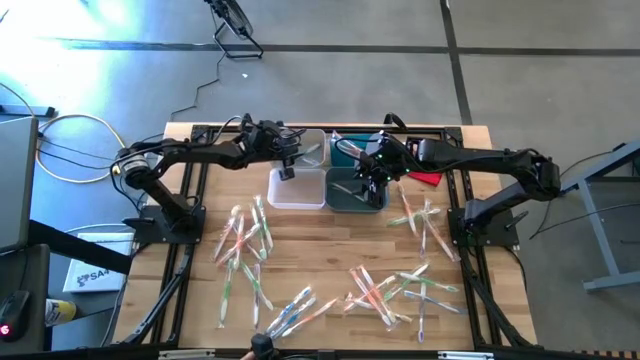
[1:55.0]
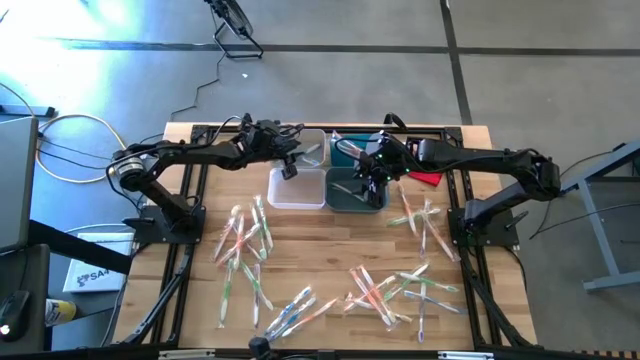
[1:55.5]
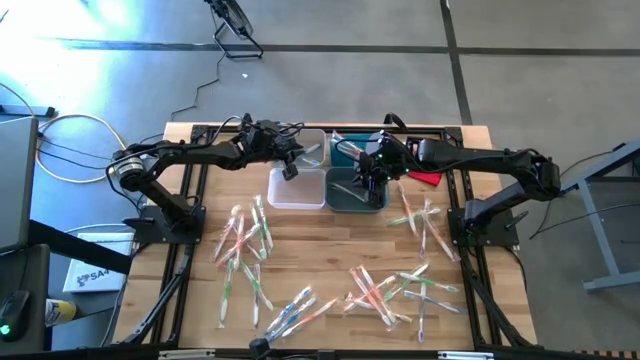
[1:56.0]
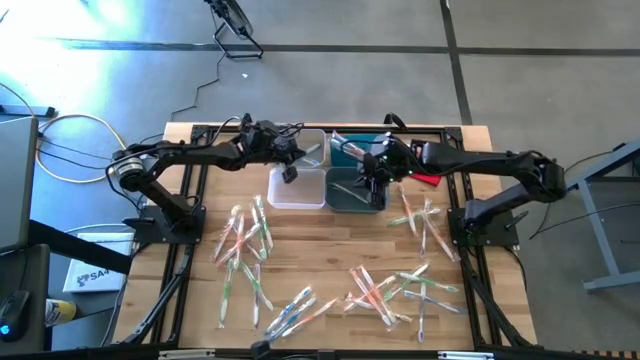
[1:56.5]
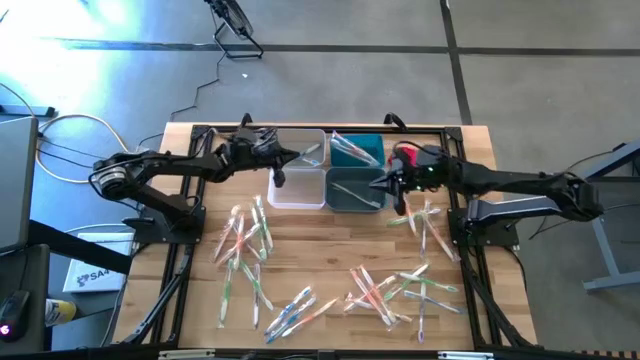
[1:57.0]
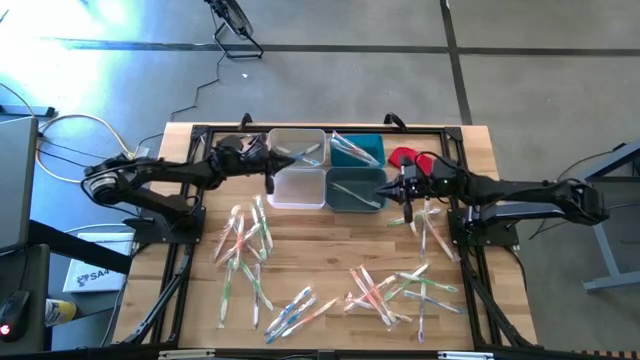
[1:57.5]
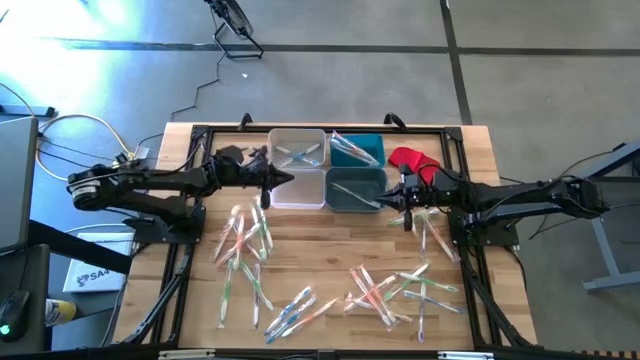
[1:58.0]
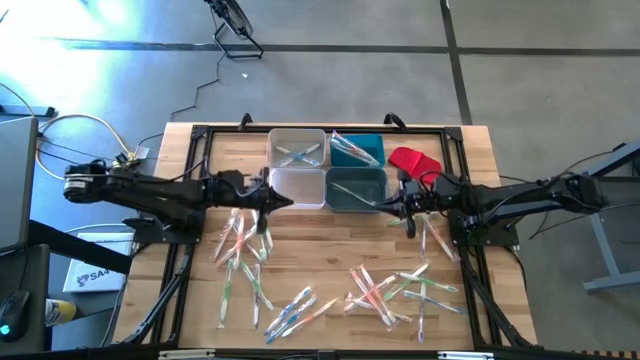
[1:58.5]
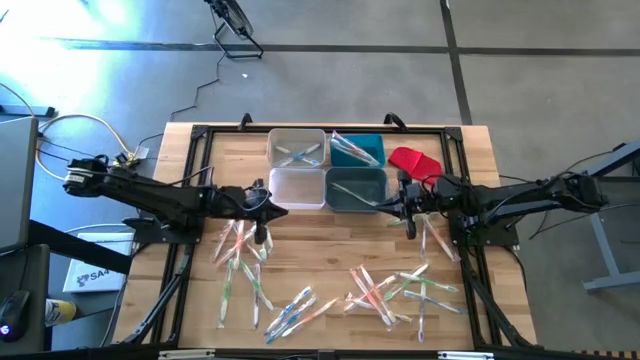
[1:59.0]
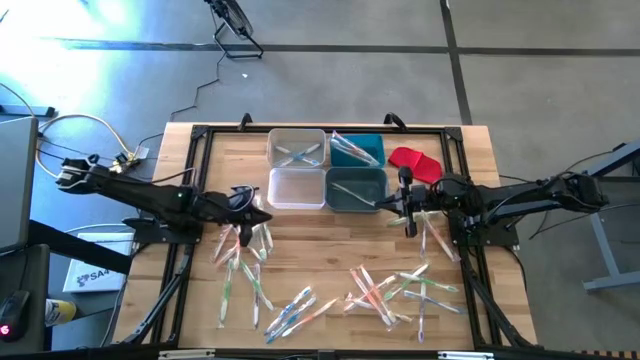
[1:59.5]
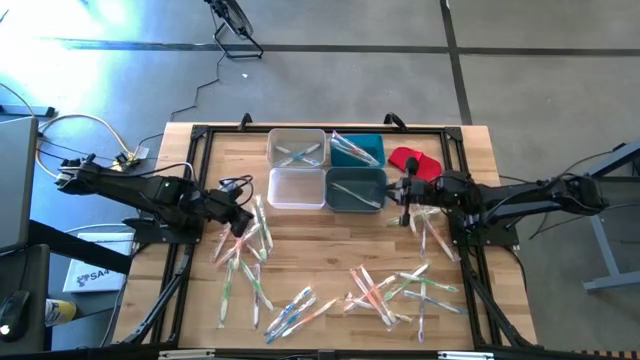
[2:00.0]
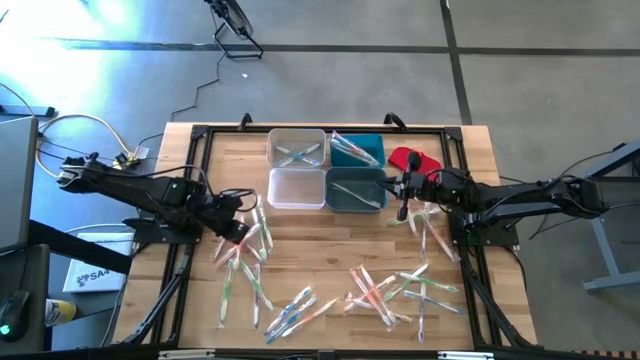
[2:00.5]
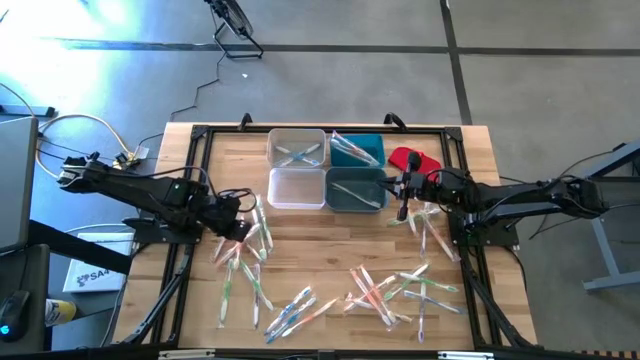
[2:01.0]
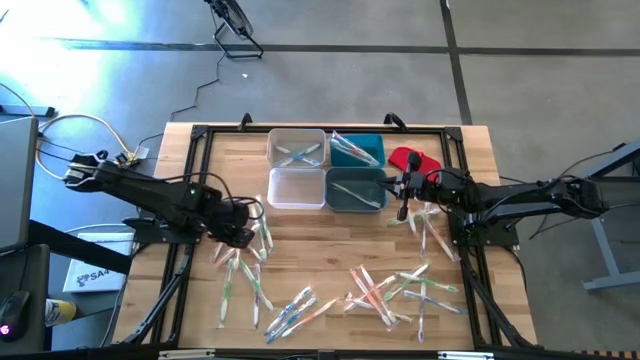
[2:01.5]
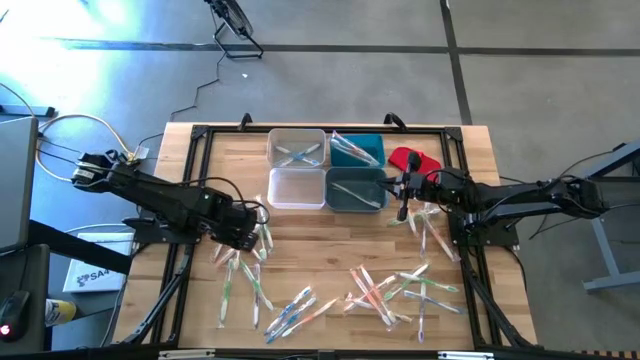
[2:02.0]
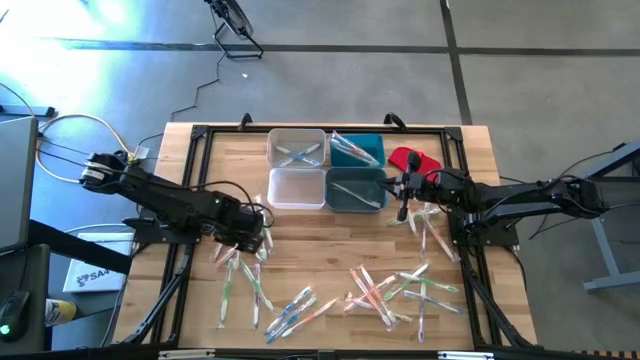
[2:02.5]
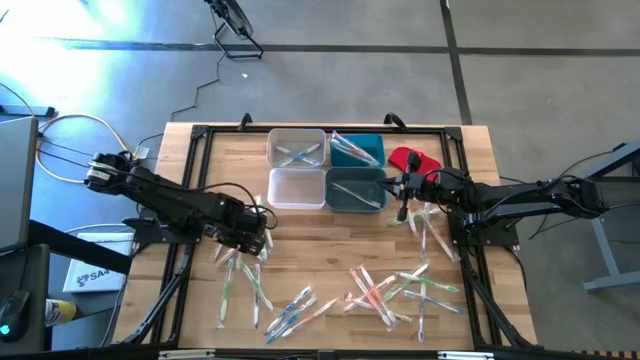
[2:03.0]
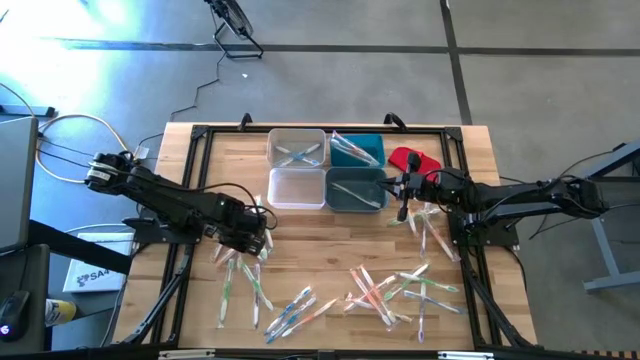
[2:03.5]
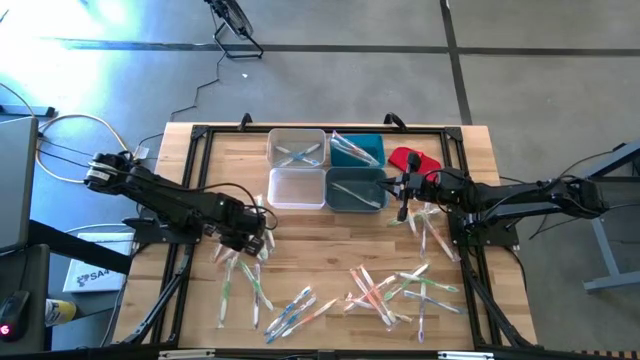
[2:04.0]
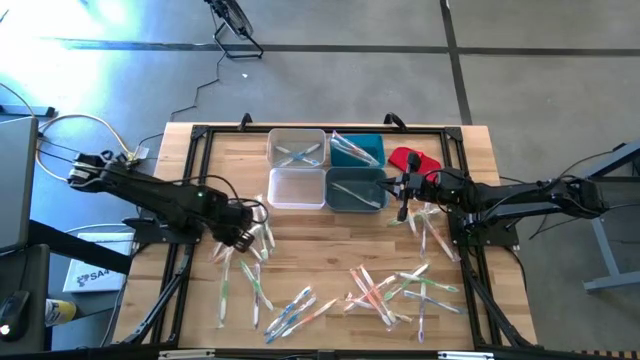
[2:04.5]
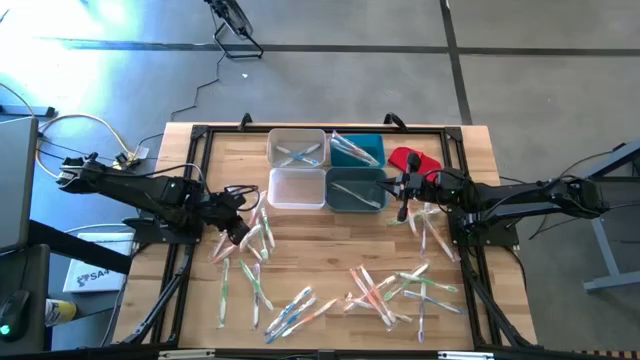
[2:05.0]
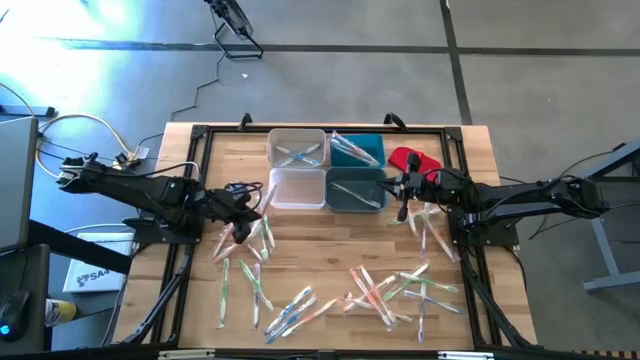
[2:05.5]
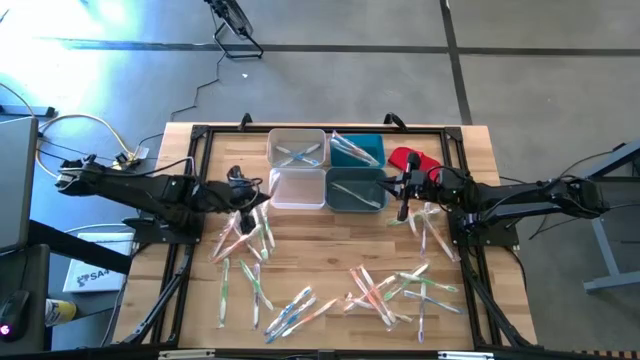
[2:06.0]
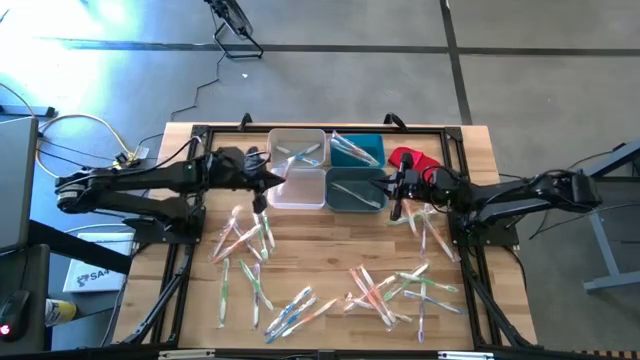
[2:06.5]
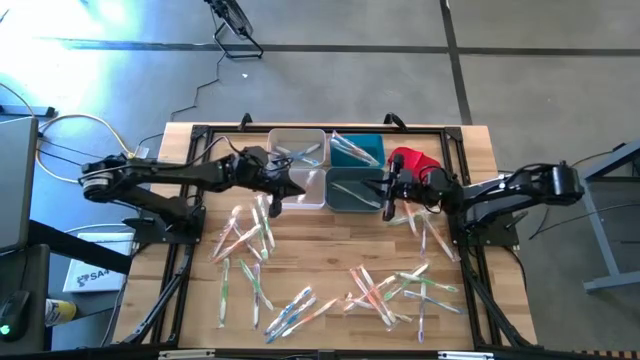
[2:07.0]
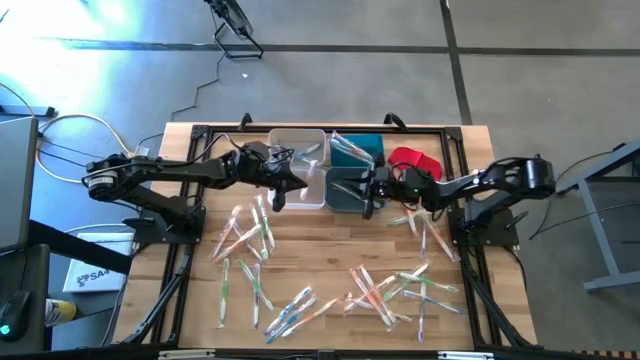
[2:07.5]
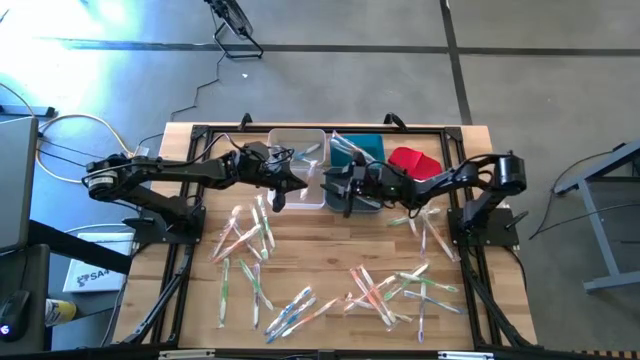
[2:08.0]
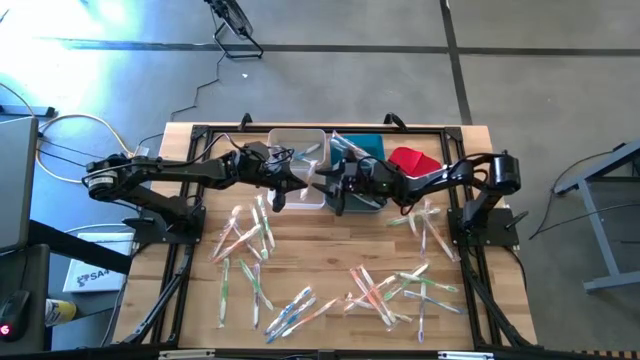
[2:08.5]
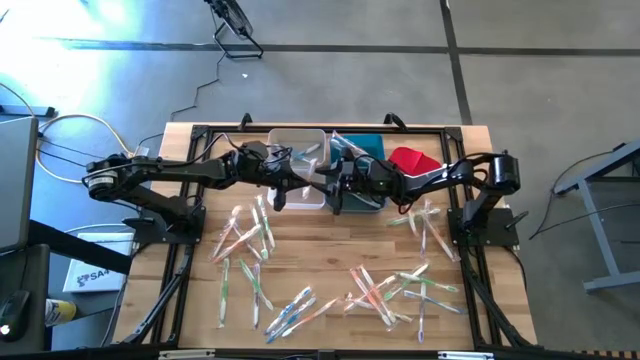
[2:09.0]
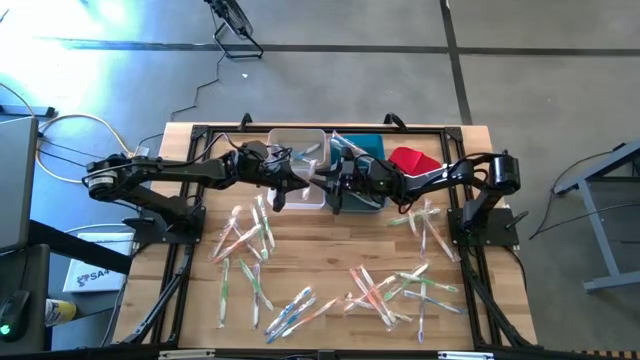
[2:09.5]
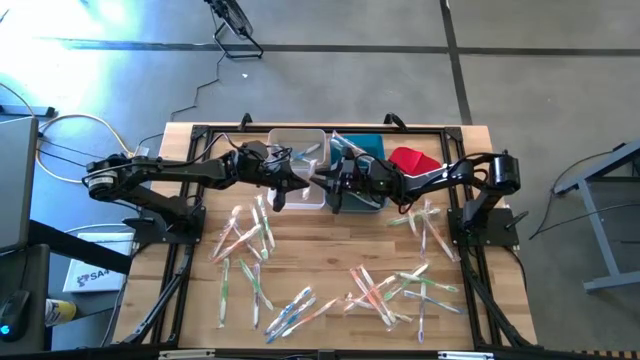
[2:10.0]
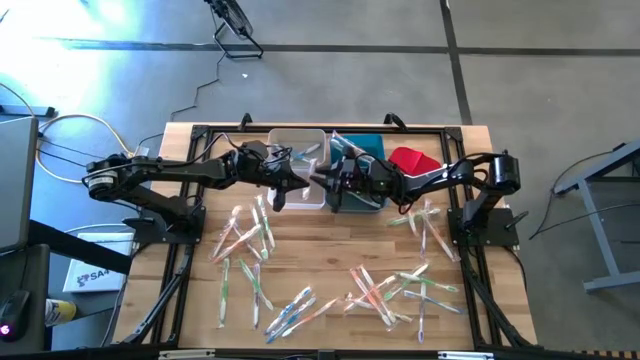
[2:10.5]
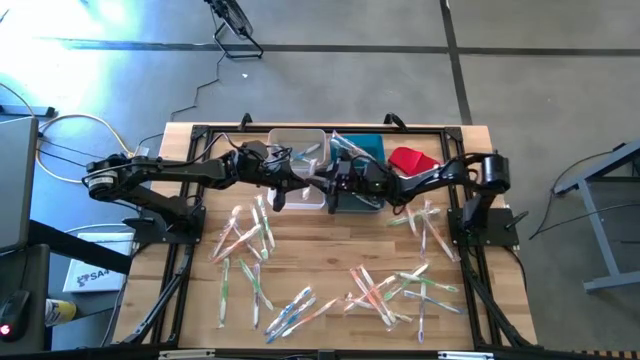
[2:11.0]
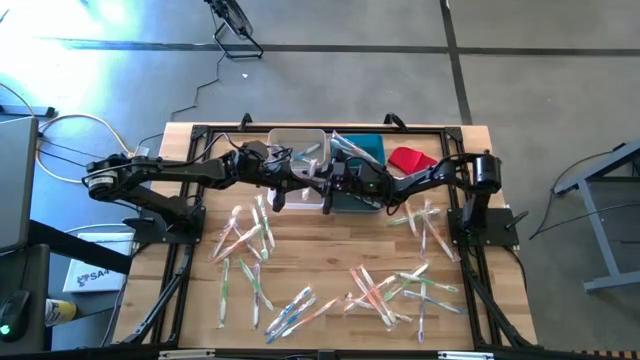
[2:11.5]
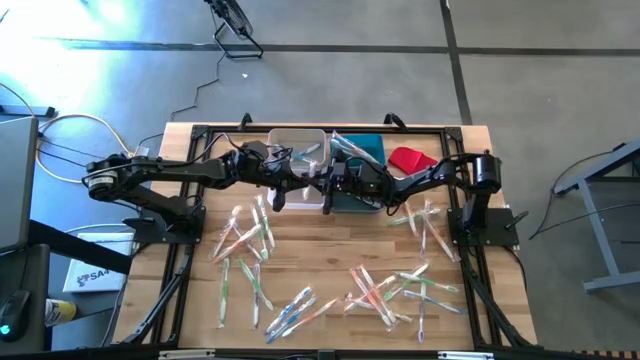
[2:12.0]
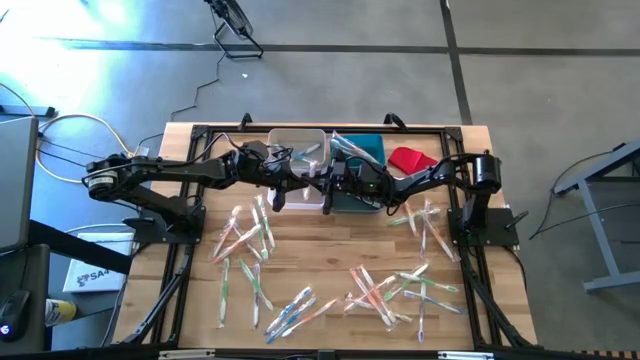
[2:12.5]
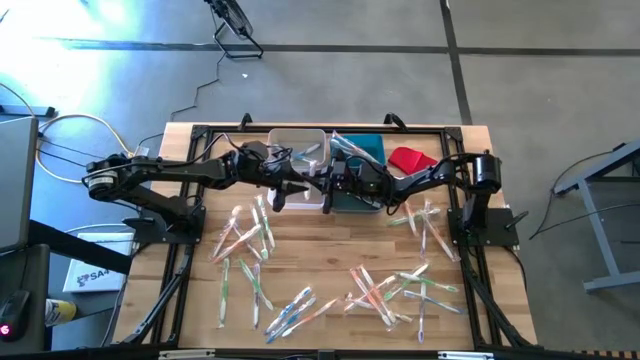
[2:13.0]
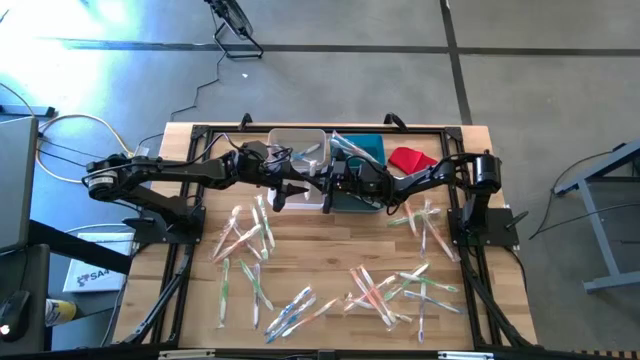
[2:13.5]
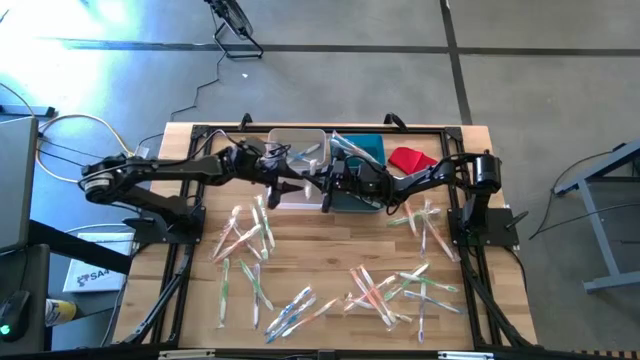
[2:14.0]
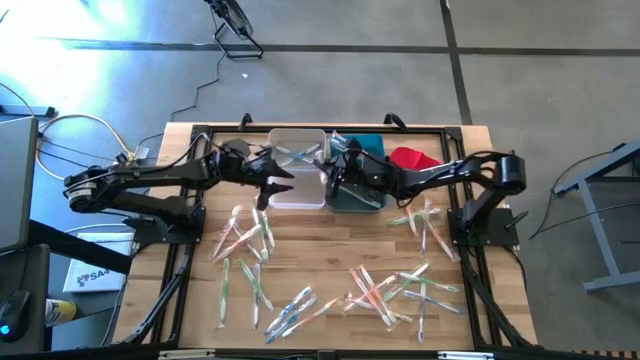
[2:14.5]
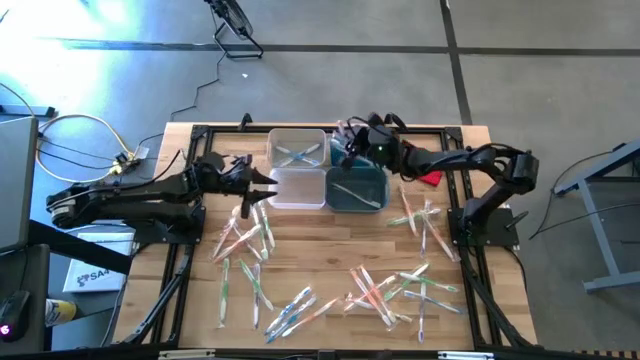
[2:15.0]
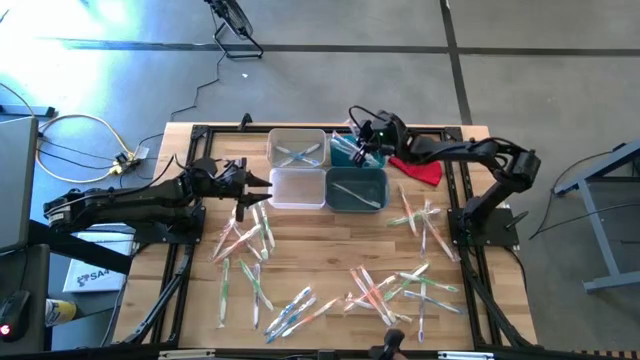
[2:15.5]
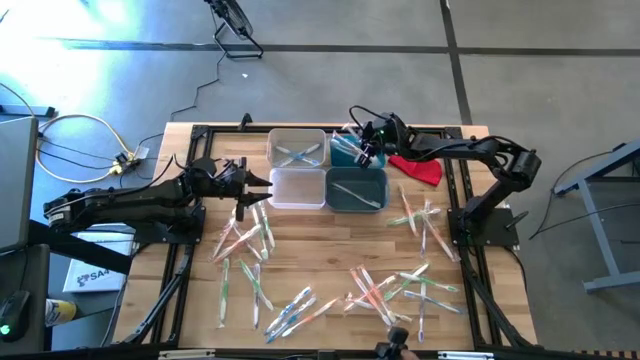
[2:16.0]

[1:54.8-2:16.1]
Task: Pick & Place Toothbrushes
Put the orange toothbrush into the blue bin

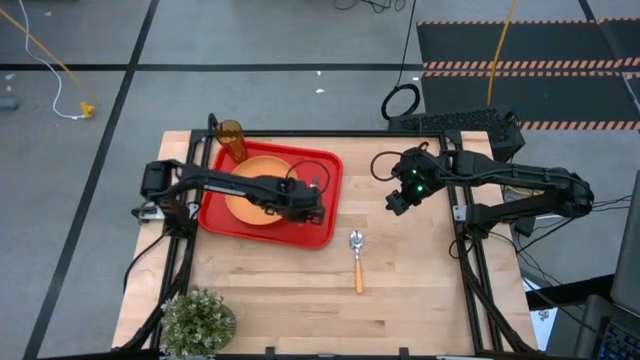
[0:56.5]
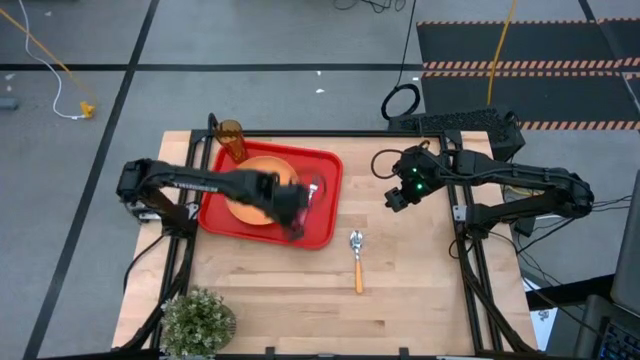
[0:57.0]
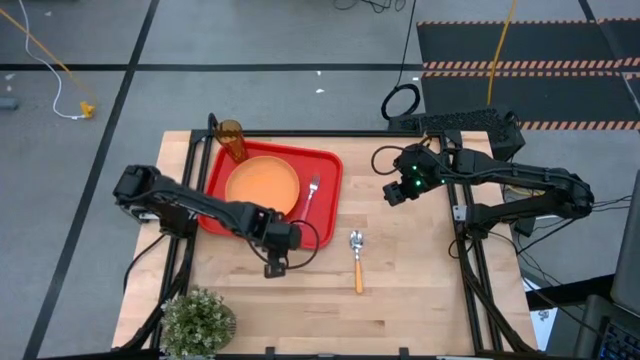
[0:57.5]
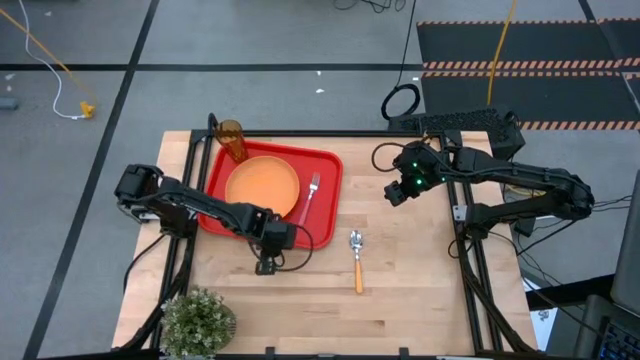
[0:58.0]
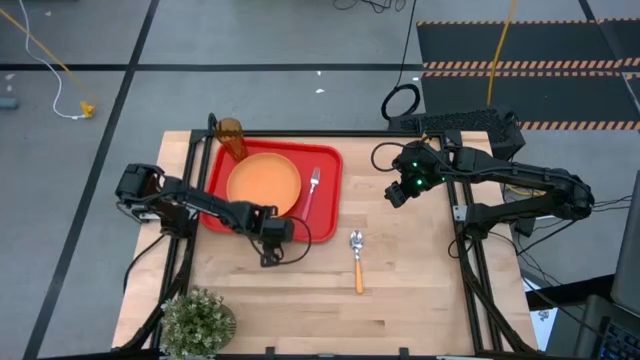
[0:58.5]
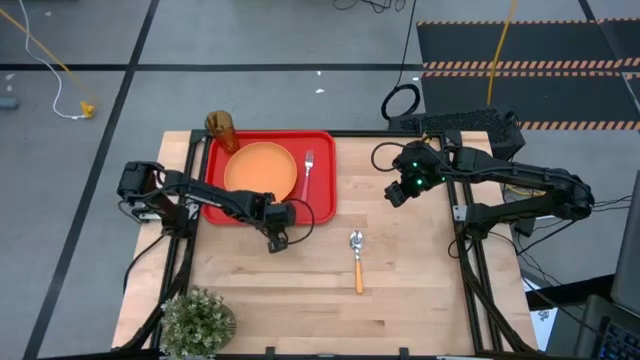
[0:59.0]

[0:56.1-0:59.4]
Task: Pick and place plate/cup/fork/spoon on tray
Adjust the red serving tray
